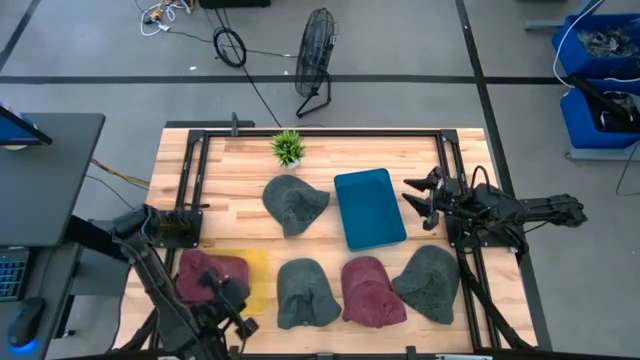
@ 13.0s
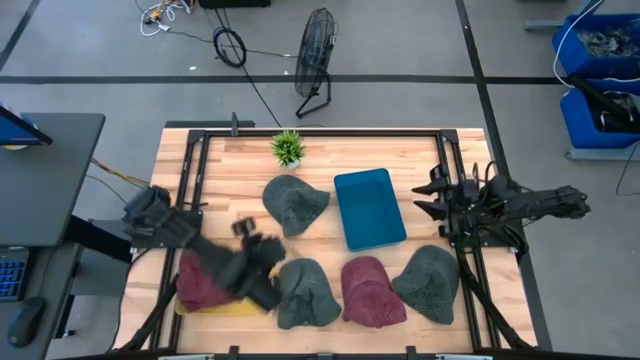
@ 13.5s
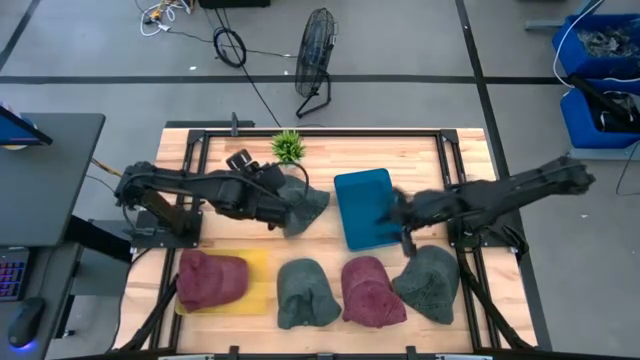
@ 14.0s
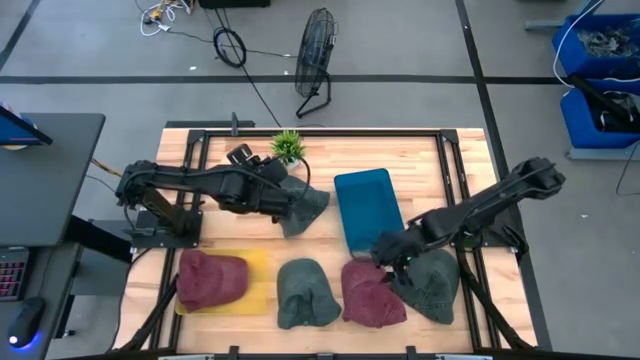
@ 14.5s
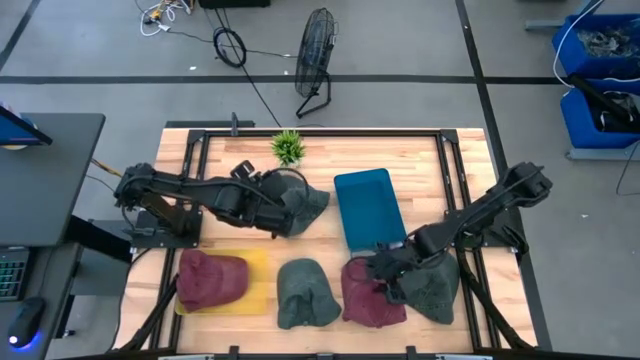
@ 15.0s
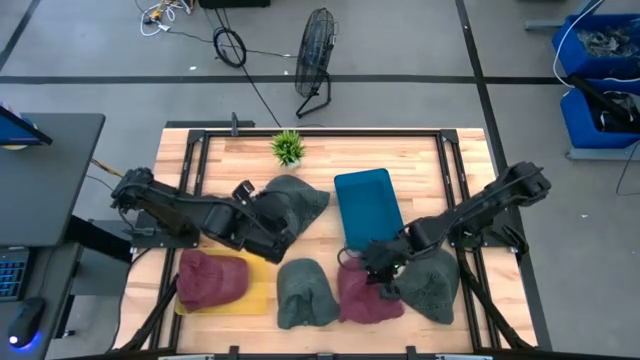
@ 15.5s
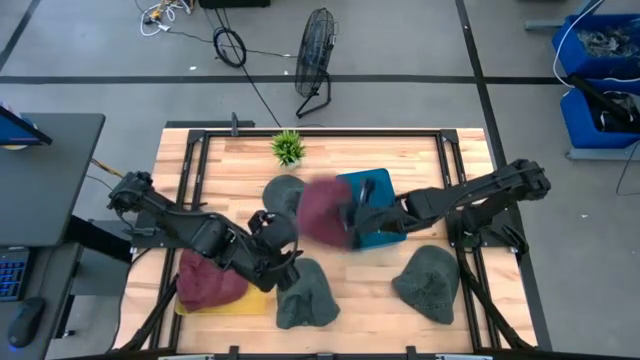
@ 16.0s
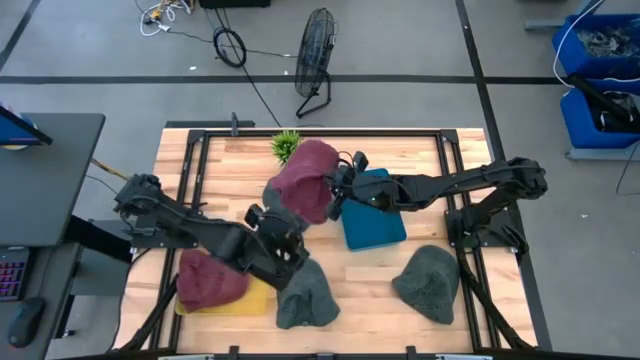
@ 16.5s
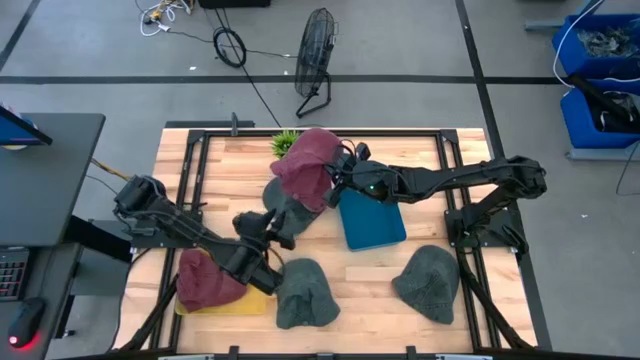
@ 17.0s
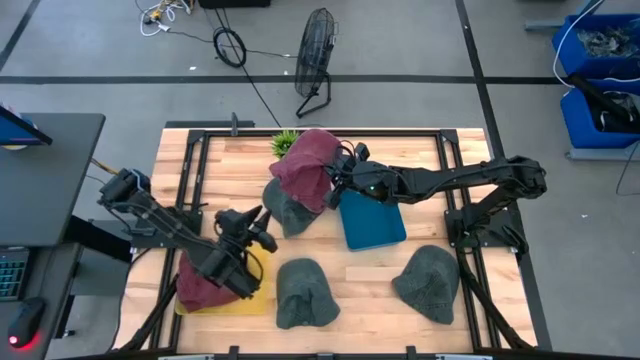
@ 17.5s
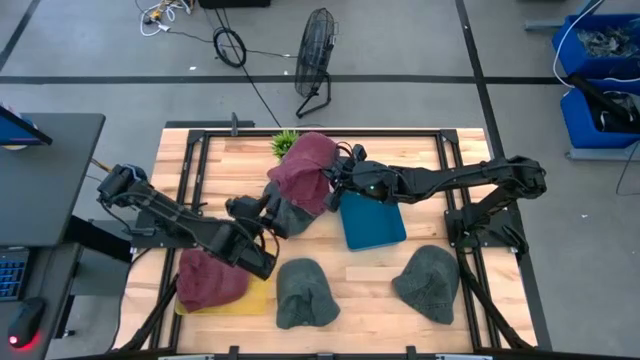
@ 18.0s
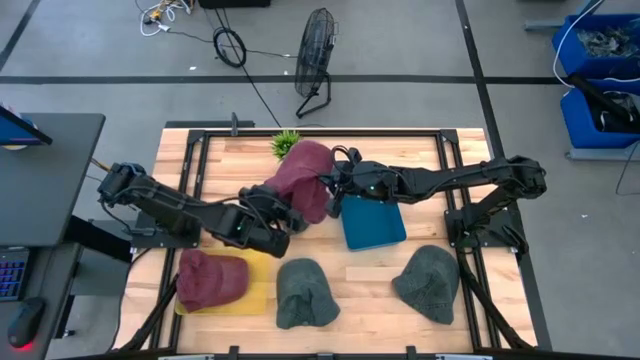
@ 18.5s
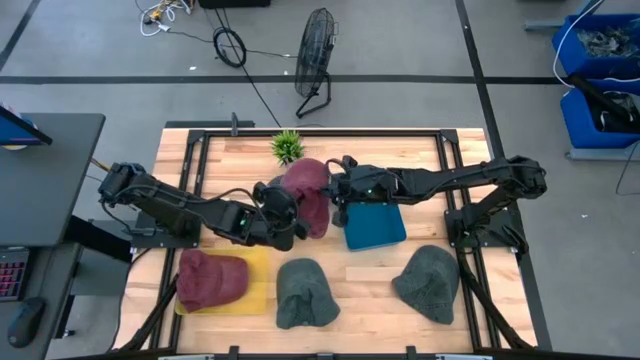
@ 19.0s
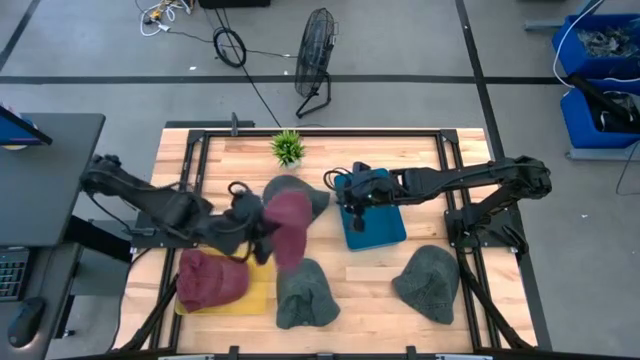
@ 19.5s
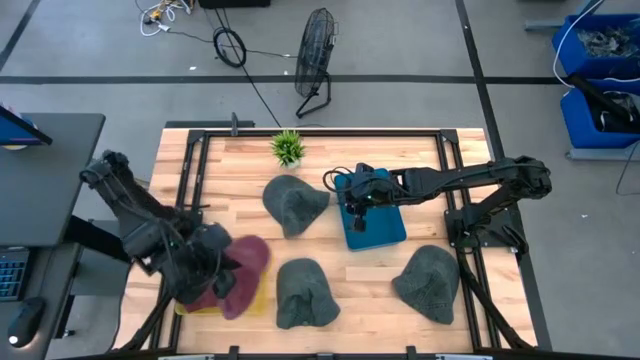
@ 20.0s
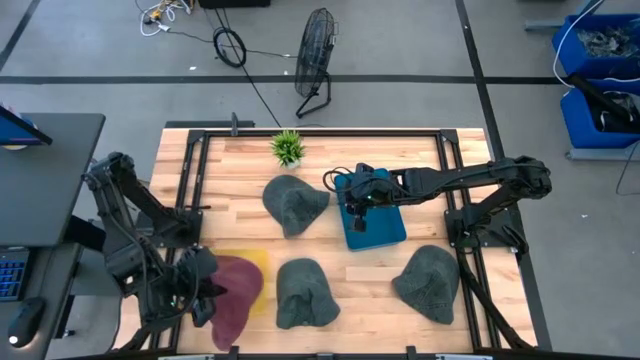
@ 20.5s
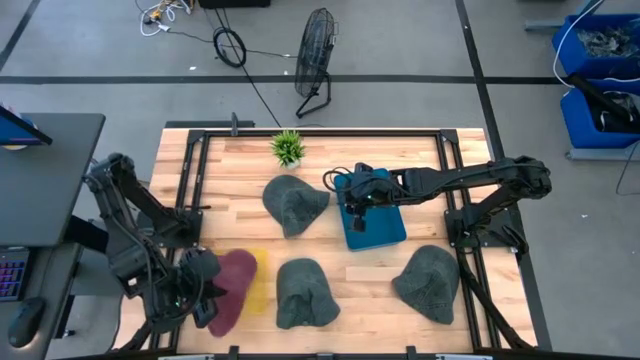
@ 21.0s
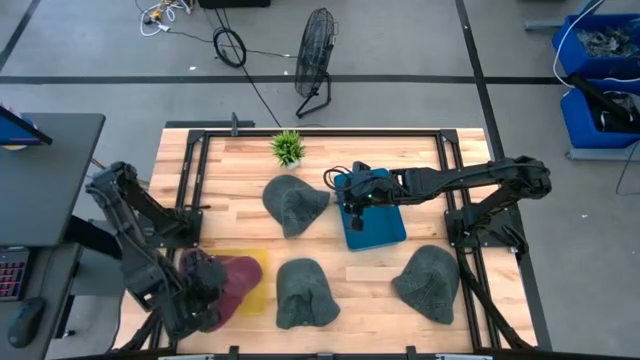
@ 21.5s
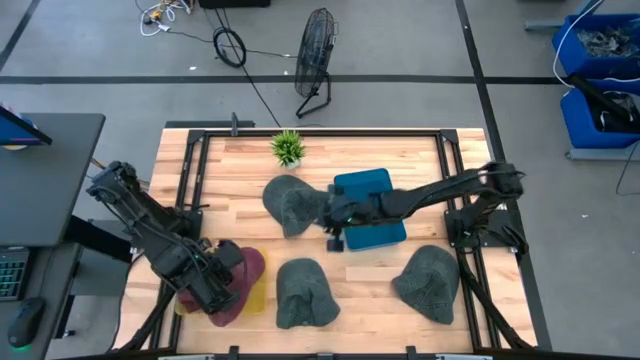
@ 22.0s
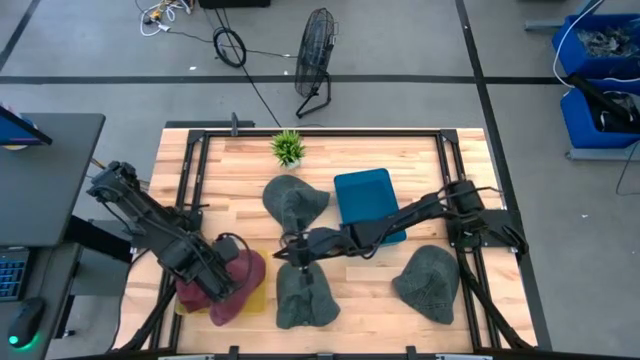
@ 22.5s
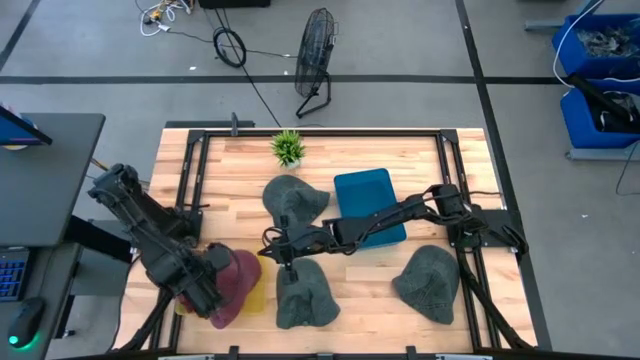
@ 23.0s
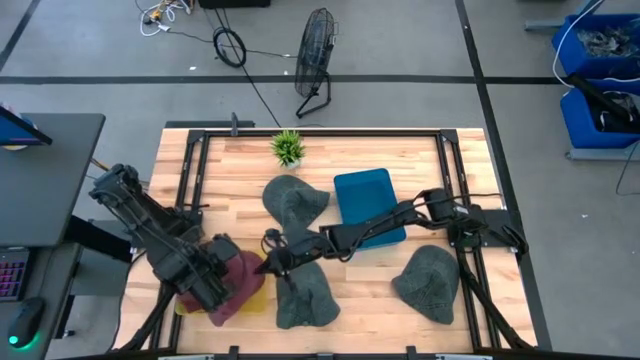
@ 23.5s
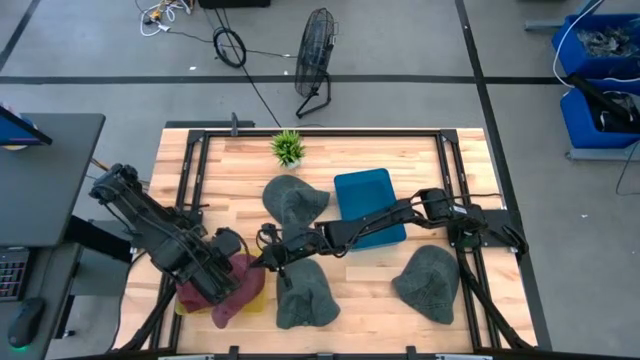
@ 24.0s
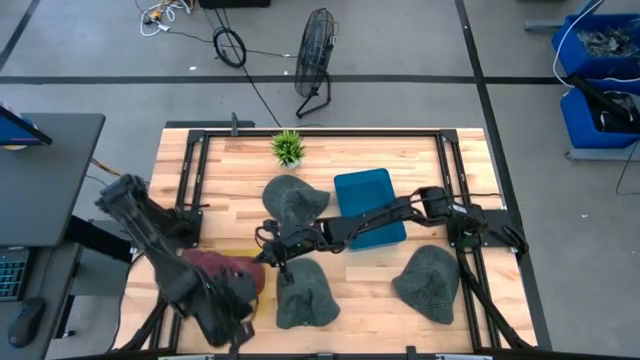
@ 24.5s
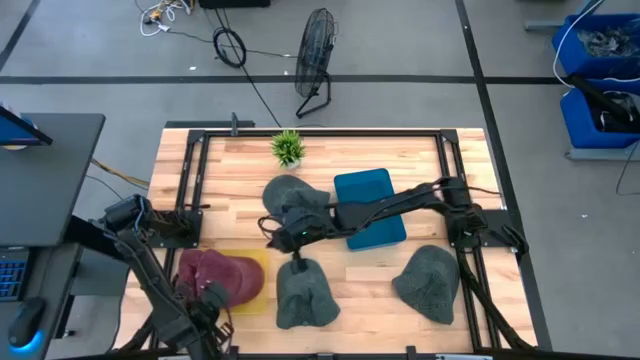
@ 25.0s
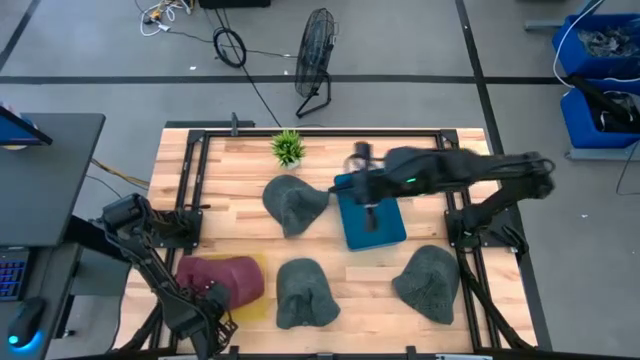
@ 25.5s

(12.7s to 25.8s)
Task: Pick & Place hat
Put the red cap into the yellow bin

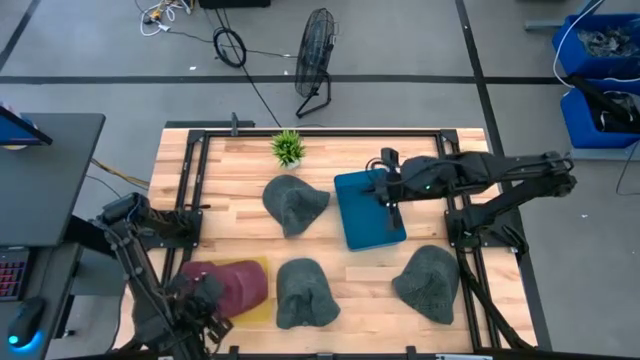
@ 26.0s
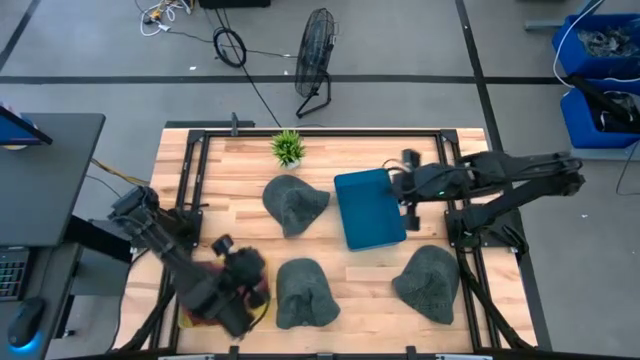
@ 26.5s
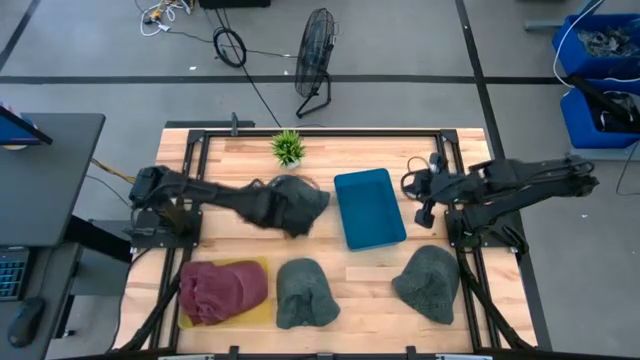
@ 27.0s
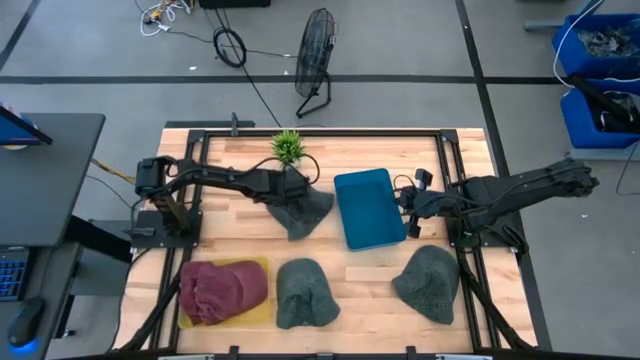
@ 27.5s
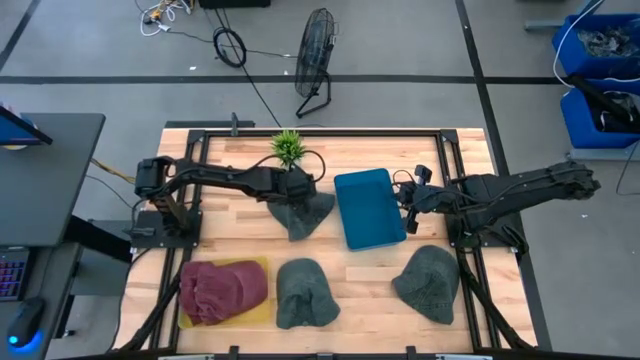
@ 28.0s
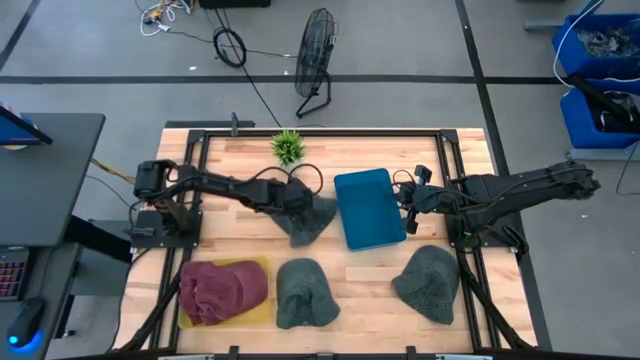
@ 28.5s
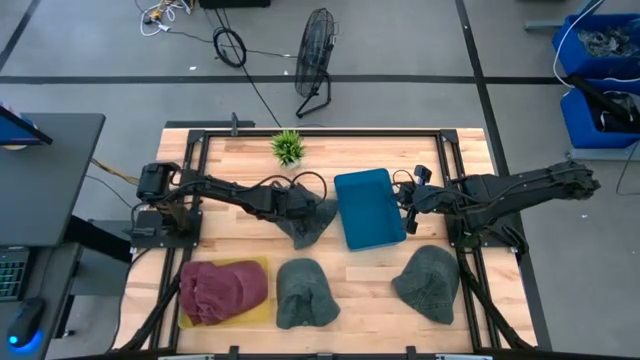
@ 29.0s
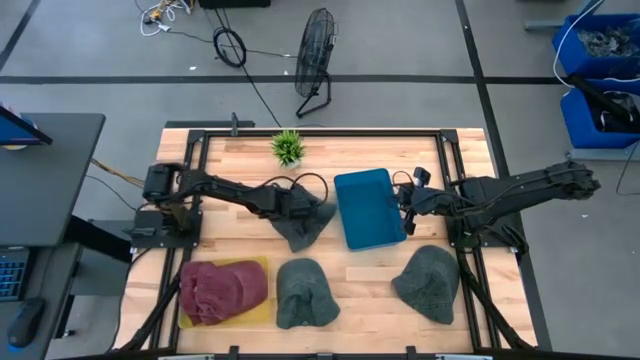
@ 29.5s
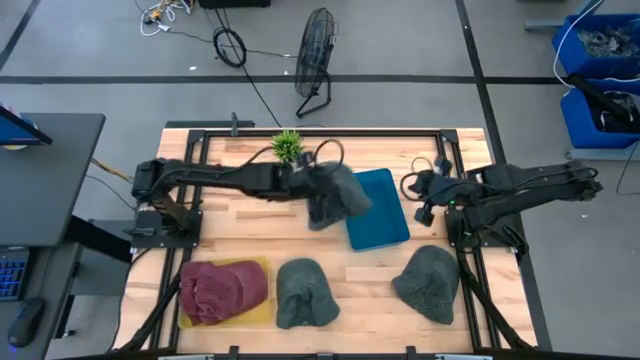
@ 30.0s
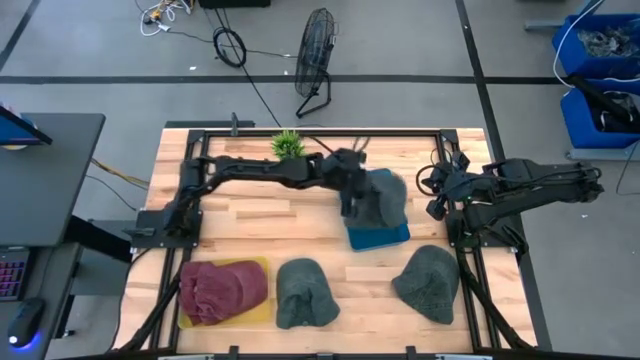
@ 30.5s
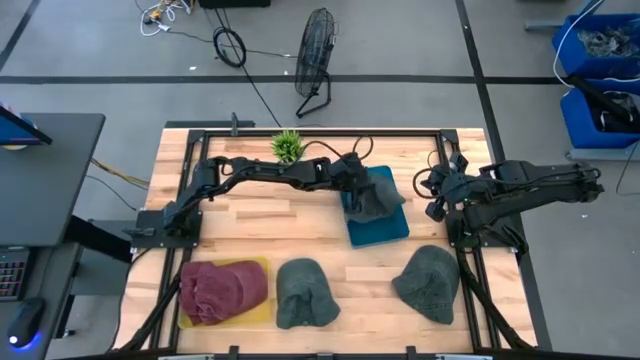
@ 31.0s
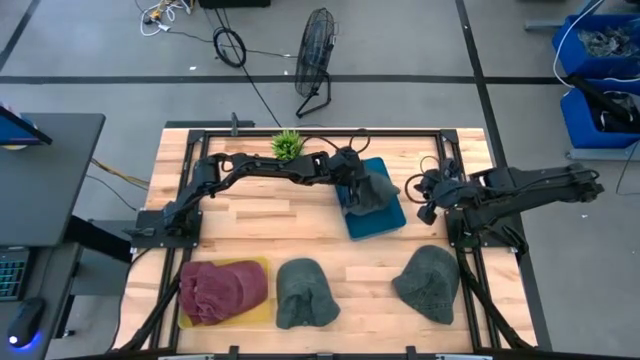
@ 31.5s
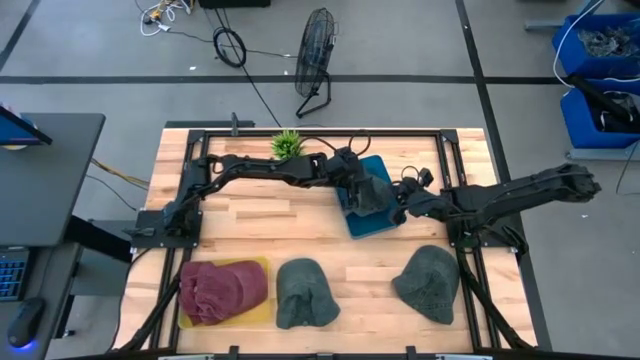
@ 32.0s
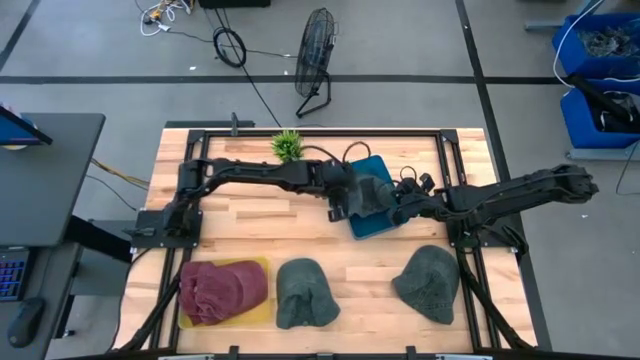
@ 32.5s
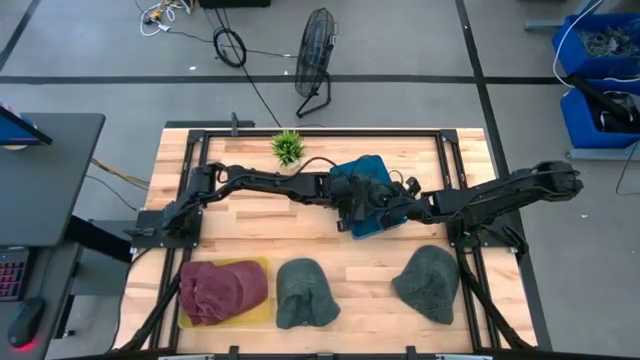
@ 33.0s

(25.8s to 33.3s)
Put the top black cap into the blue bin
